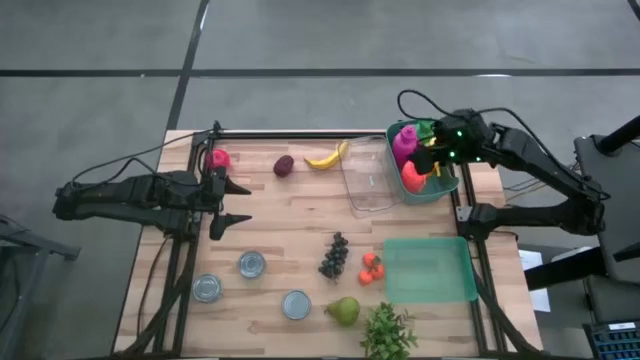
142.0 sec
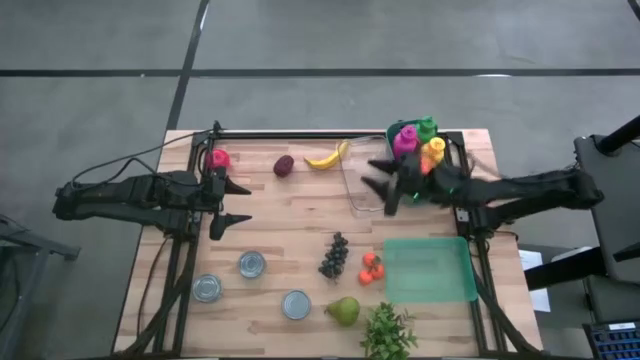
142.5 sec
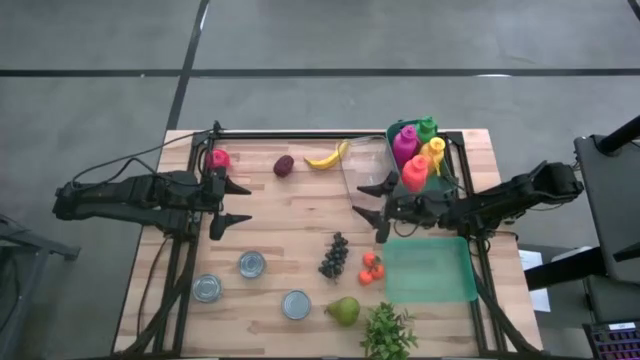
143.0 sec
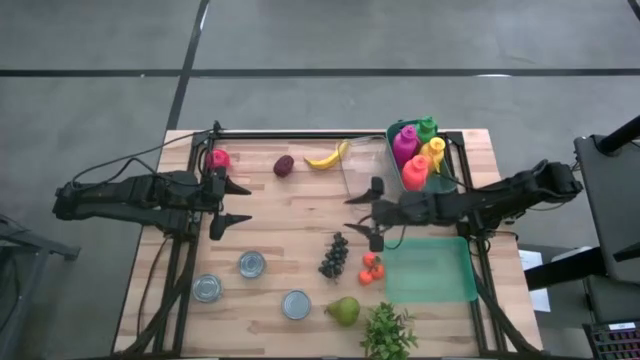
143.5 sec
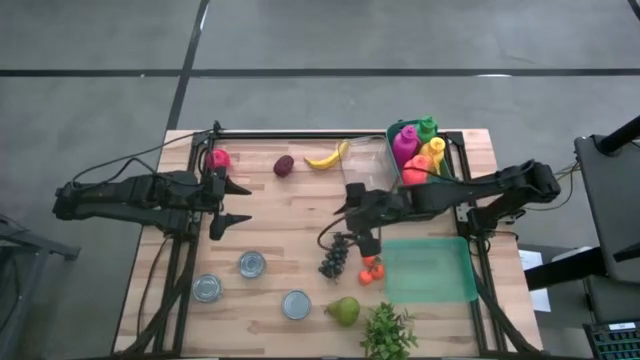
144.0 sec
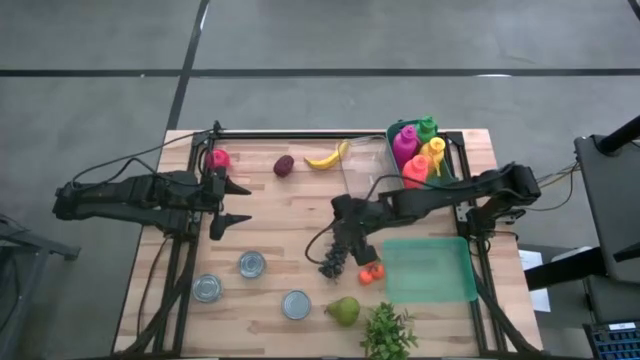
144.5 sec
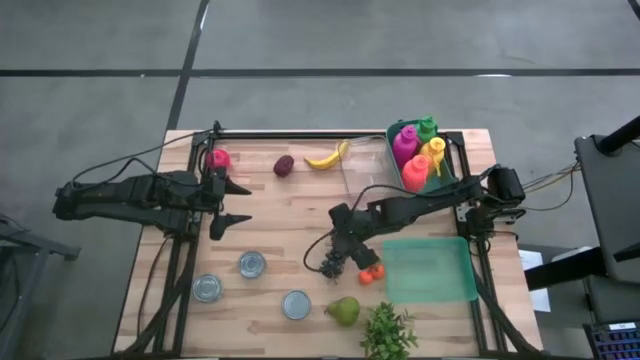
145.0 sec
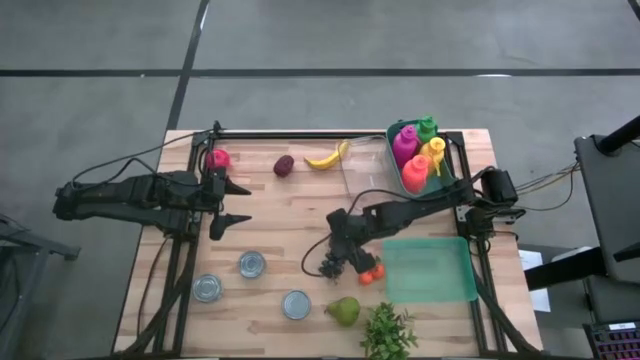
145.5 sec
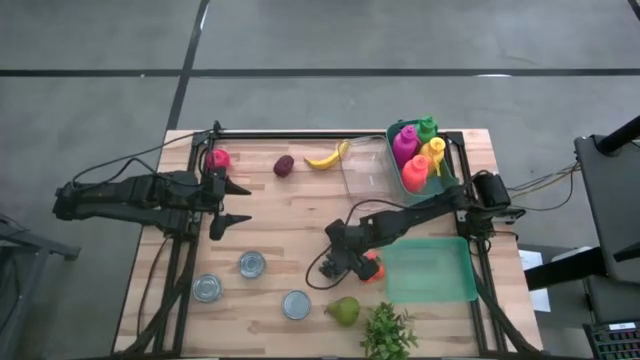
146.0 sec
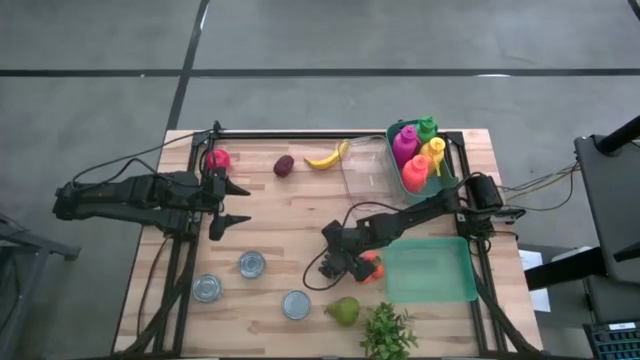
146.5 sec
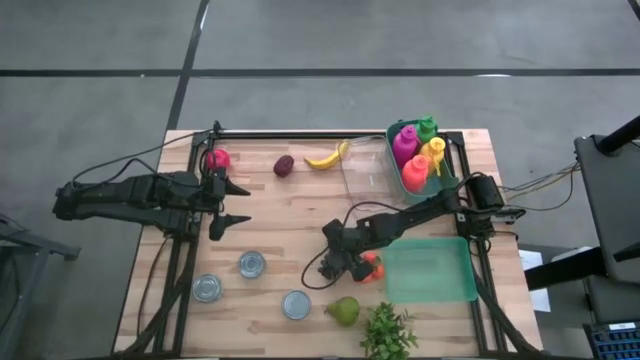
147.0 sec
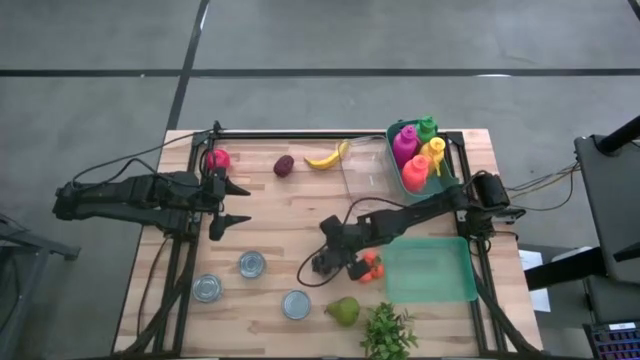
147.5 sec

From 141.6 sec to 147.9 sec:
Task: Pick & Place Food Item
Put the grapes into the green transparent bin

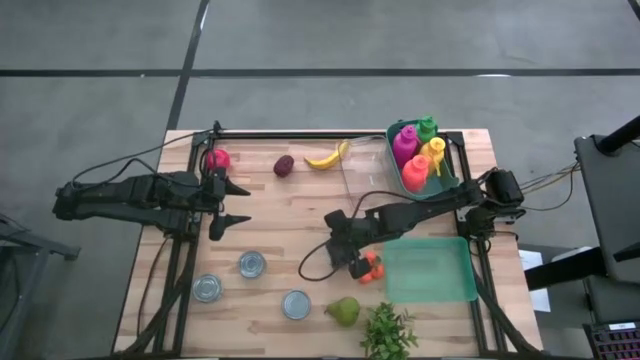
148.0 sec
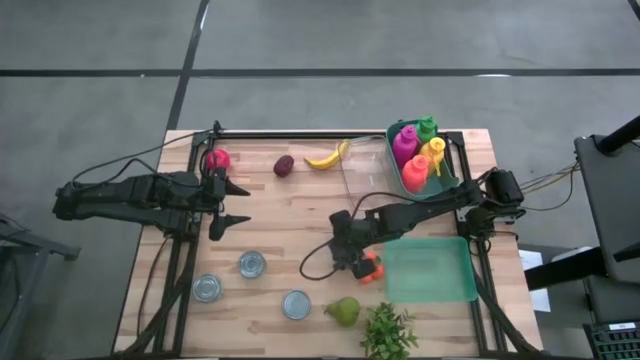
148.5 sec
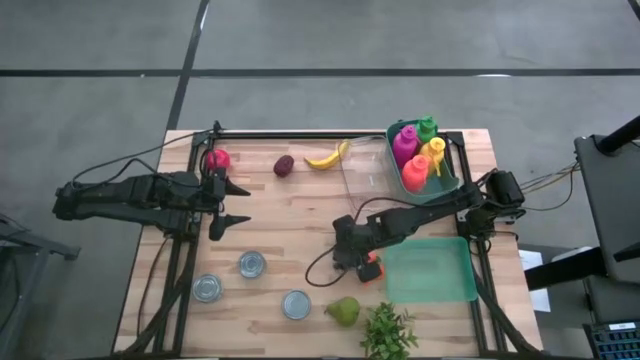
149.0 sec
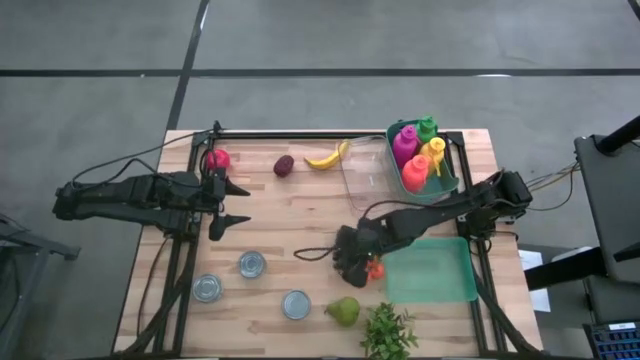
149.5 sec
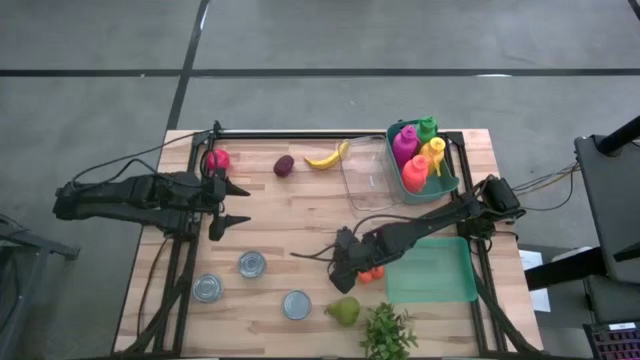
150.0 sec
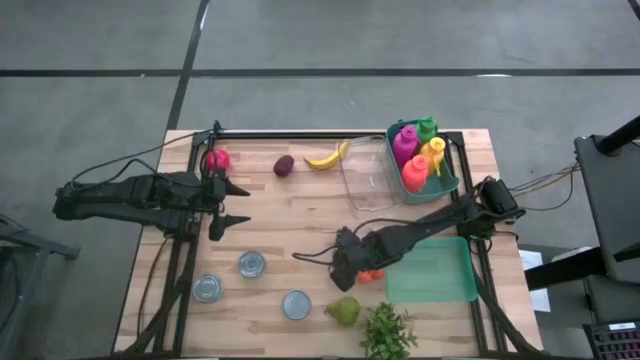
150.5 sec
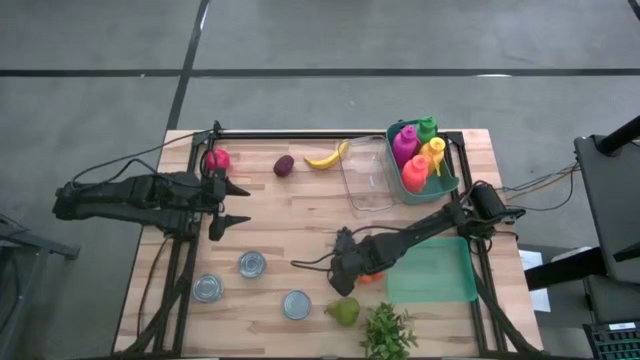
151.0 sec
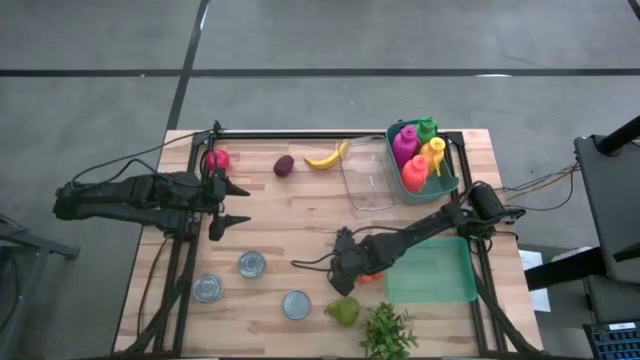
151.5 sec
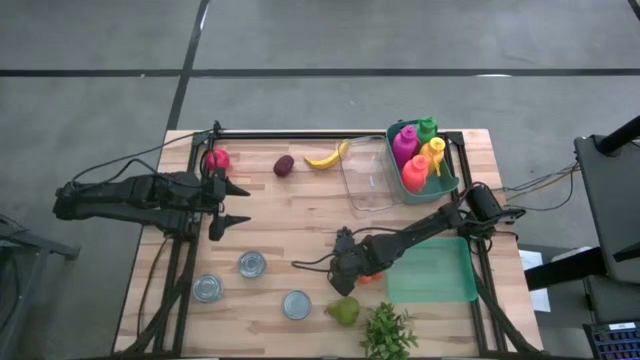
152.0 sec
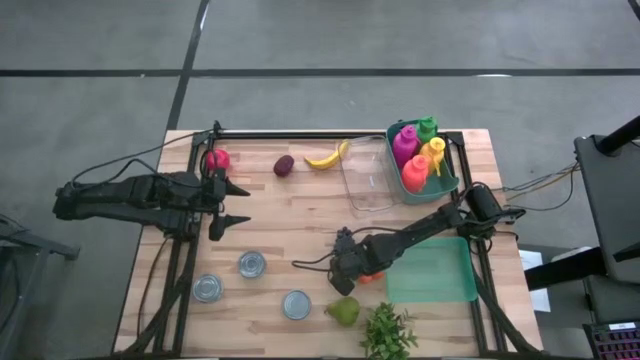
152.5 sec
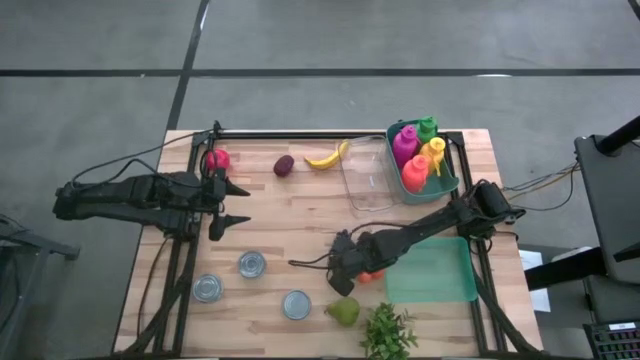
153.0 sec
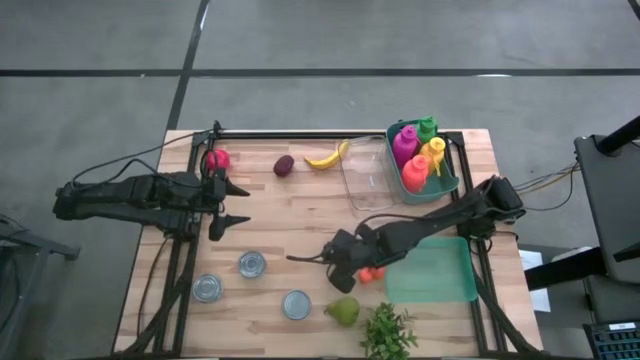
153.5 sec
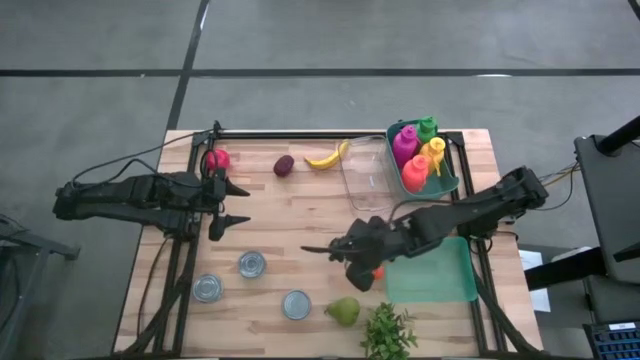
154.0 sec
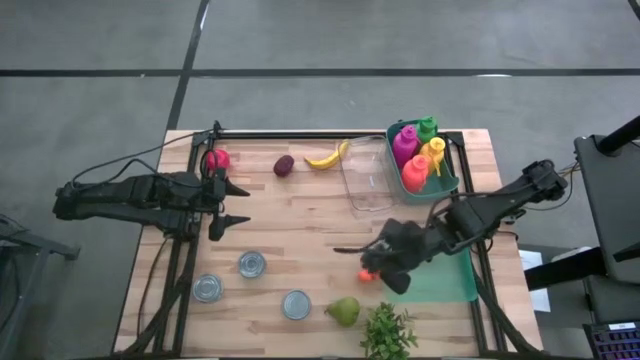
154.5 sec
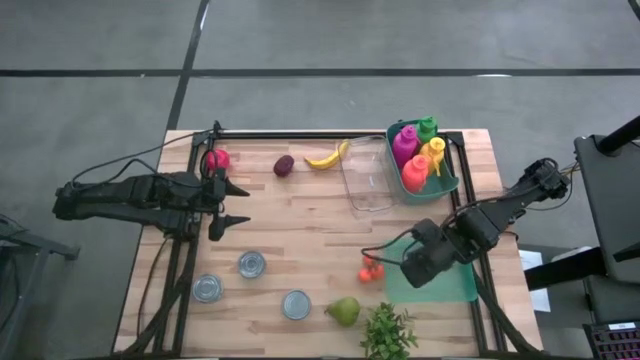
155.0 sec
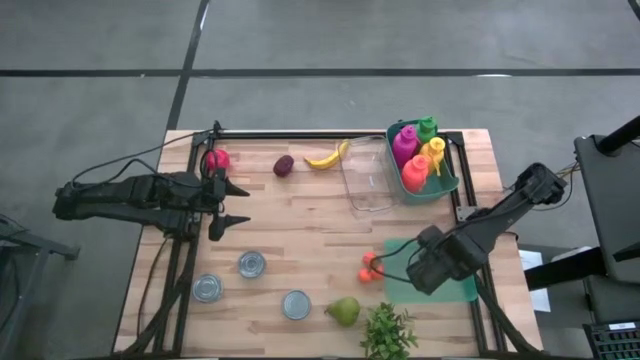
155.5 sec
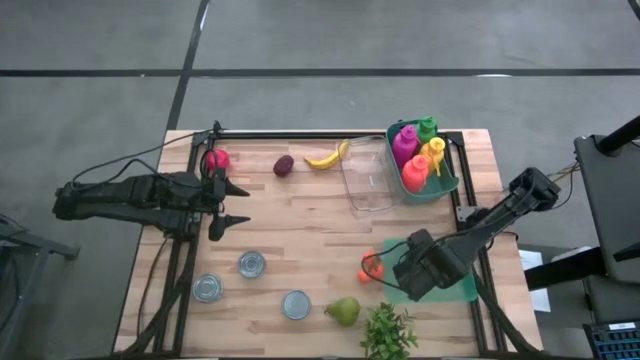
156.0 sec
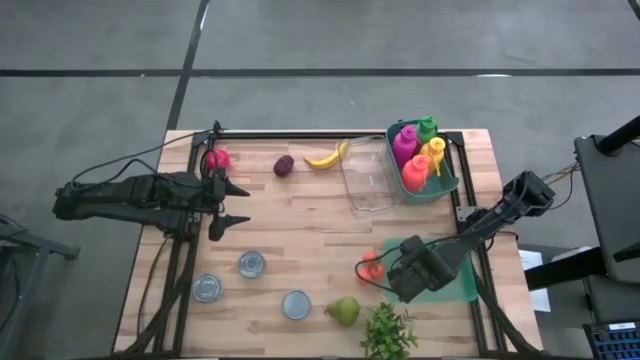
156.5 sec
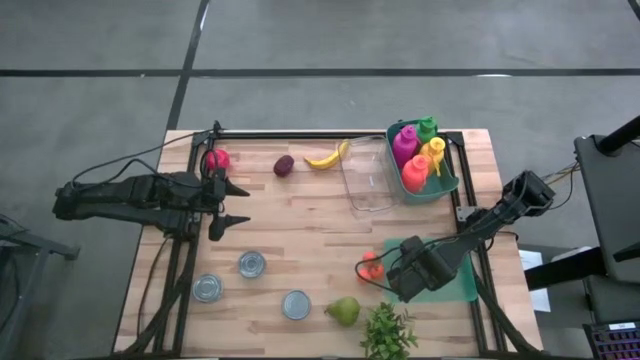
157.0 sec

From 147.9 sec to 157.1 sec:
Put the grapes into the green transparent bin

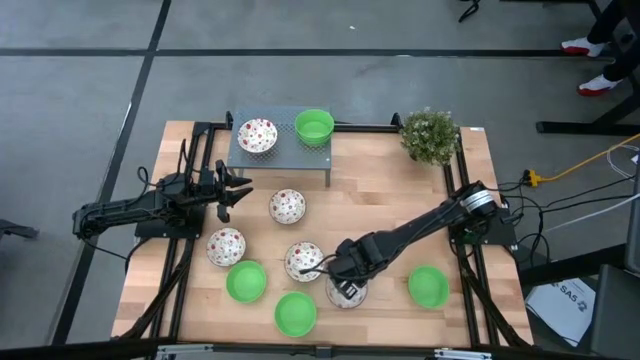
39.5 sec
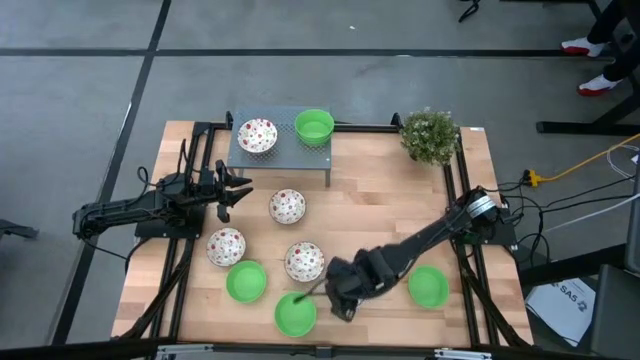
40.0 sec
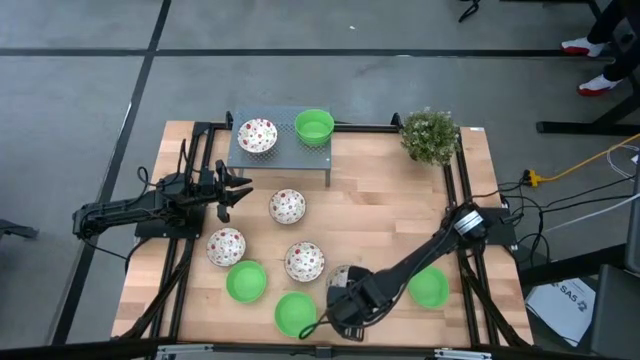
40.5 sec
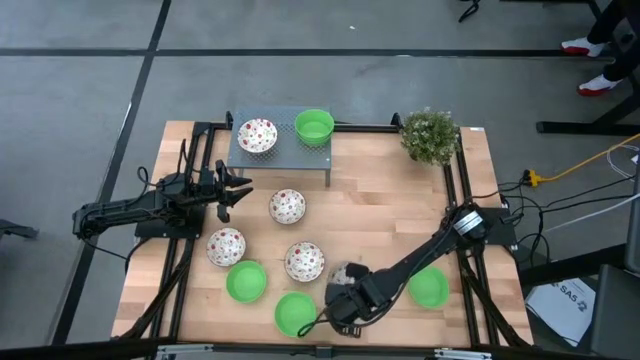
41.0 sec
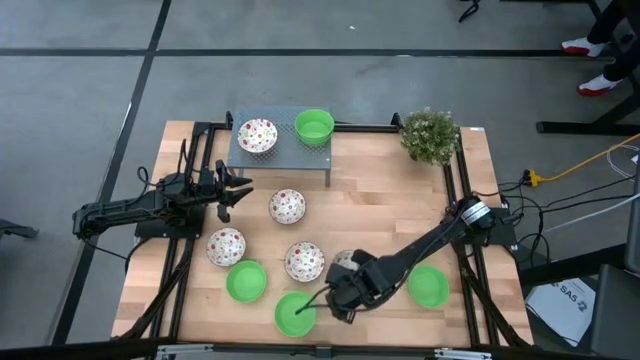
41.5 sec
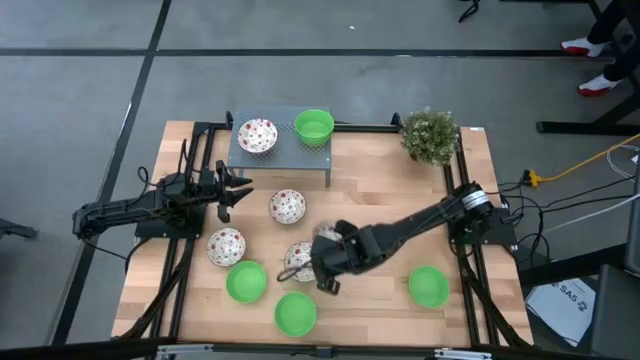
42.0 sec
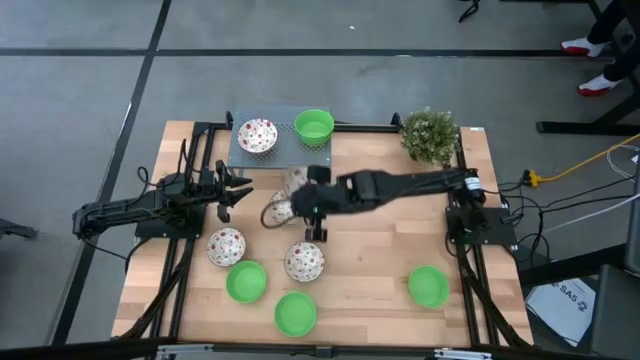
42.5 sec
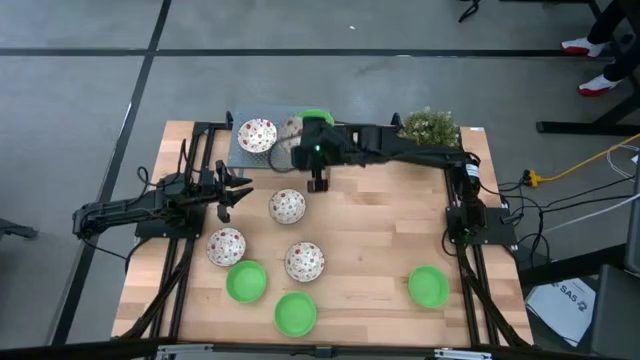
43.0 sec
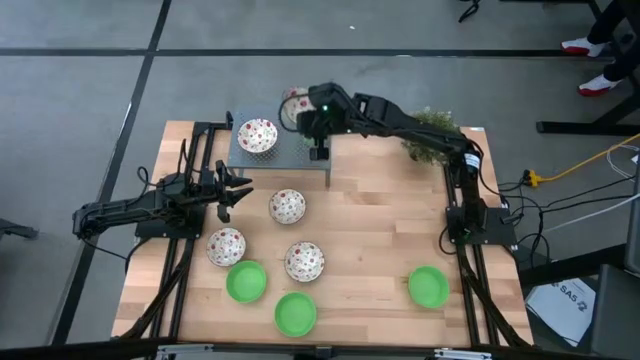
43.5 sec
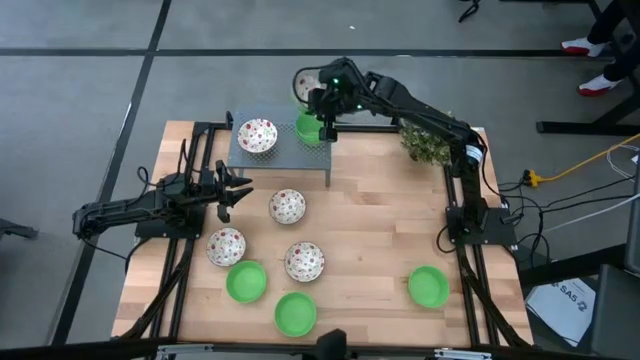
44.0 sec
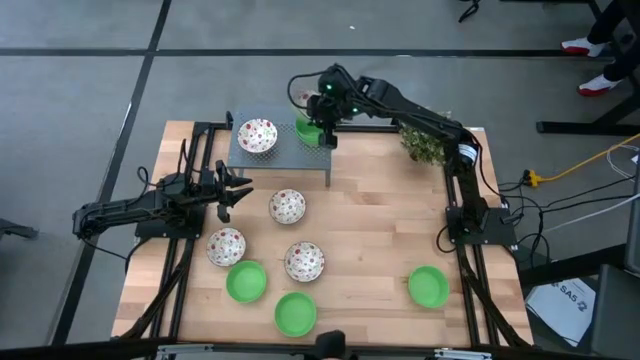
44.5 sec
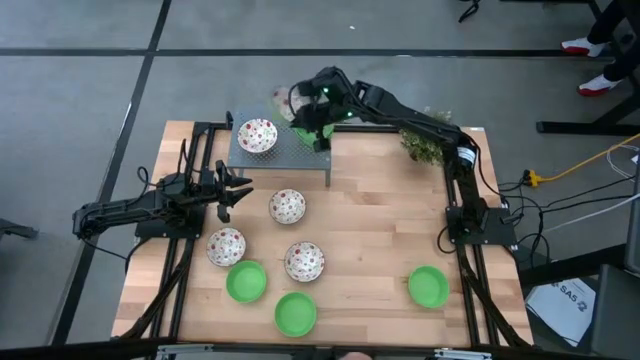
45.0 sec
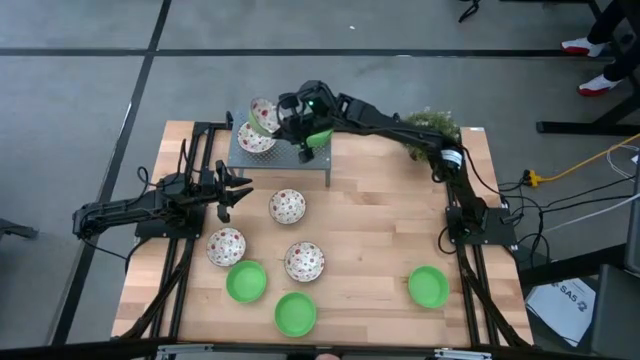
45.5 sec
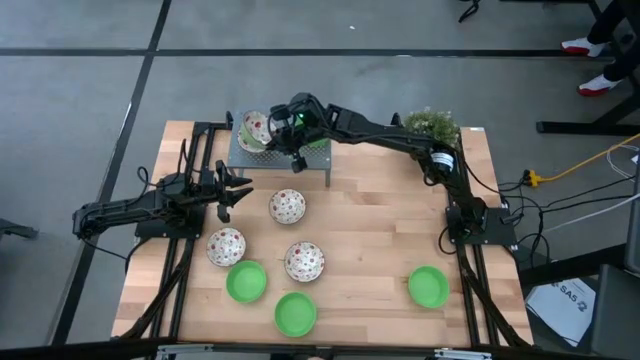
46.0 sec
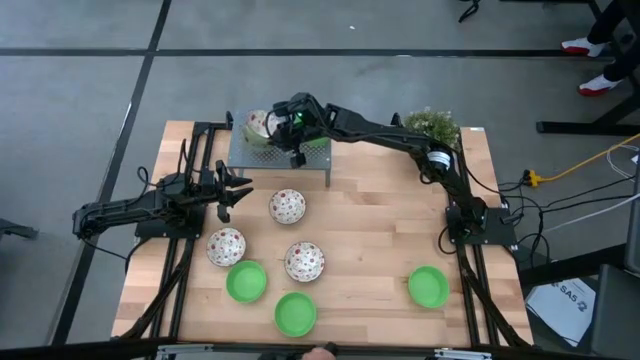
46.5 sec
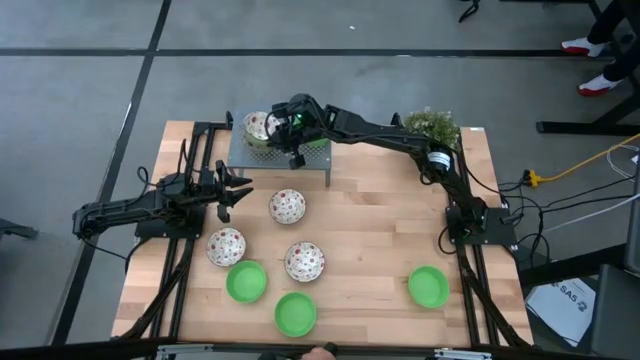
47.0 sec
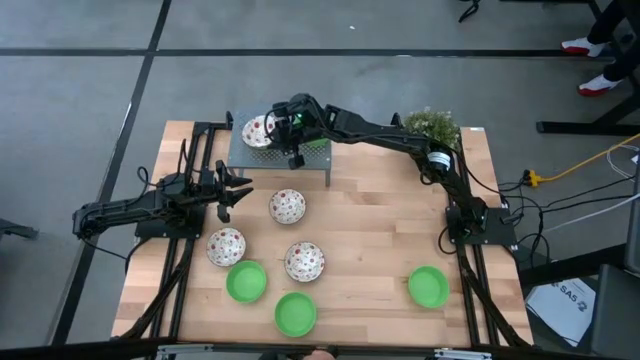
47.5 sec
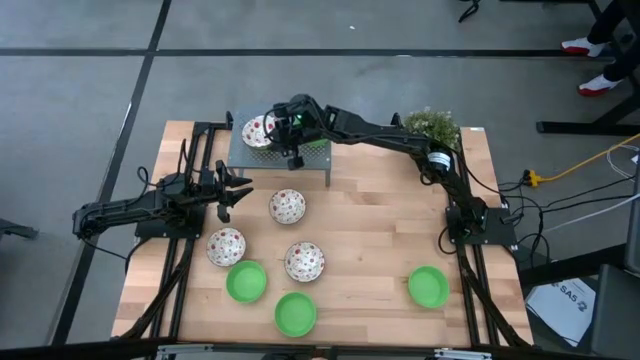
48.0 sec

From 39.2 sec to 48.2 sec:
Task: Pick & Place Mini bowls
Stack the white bowl on top of the white bowl on the shelf
